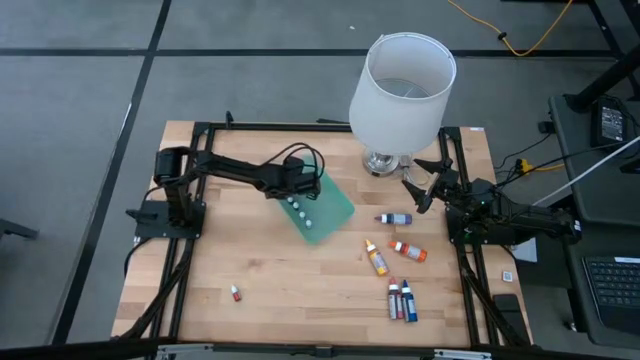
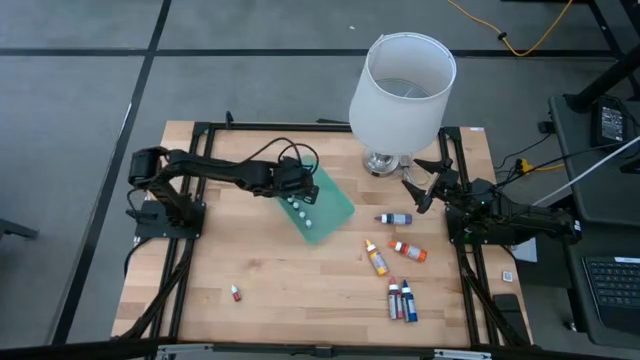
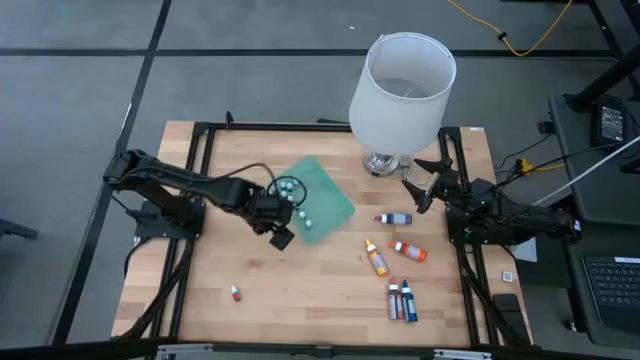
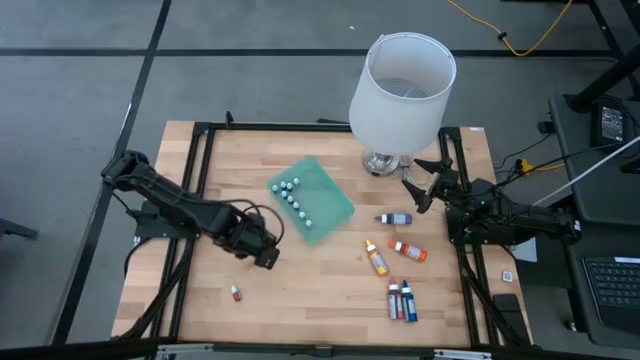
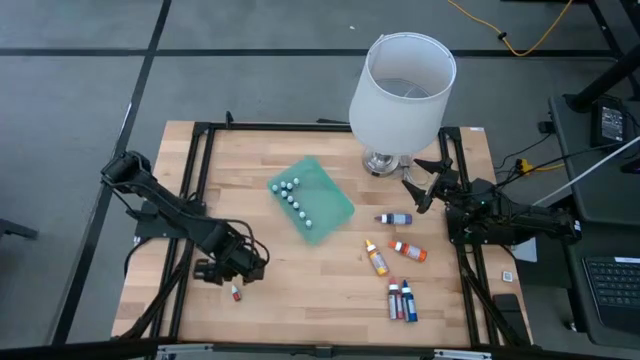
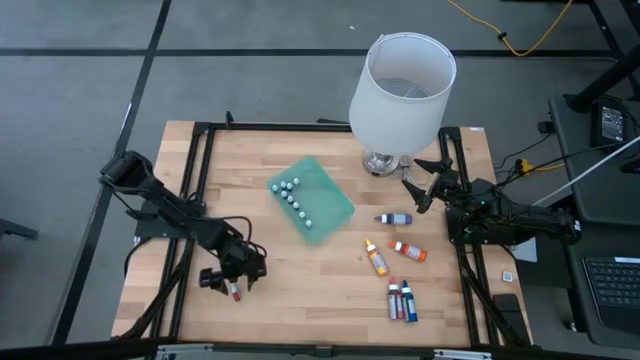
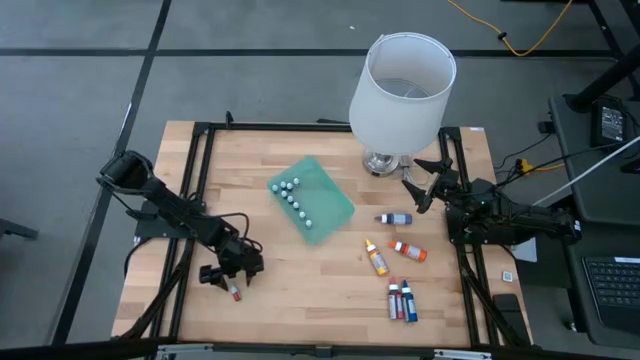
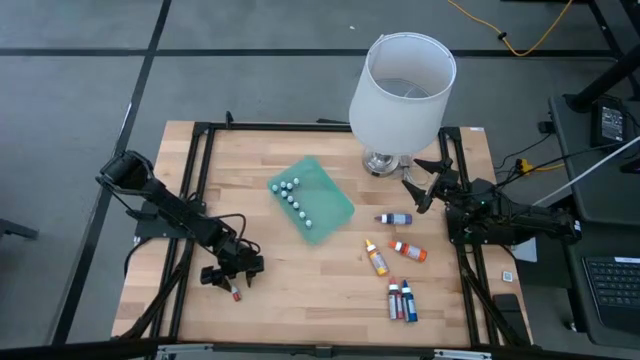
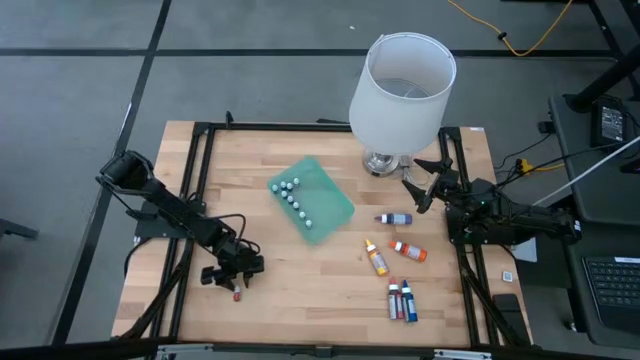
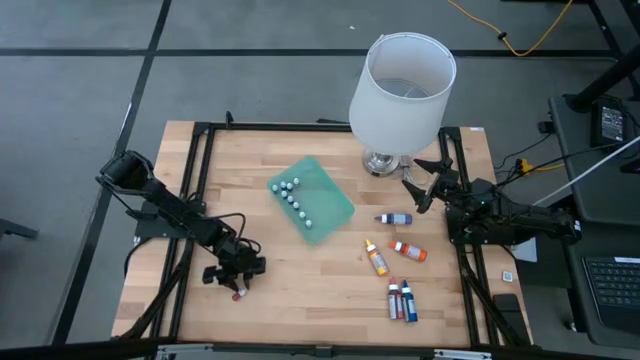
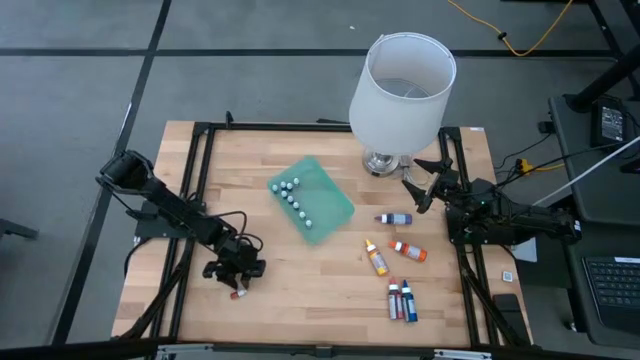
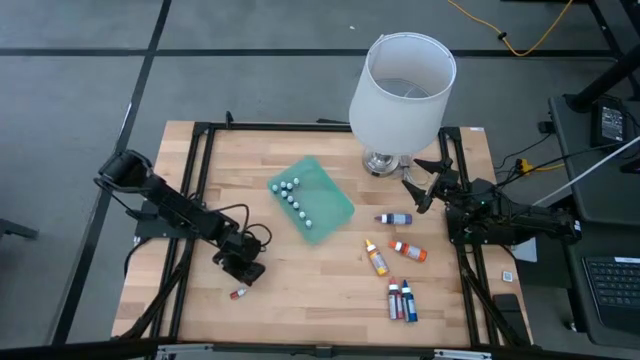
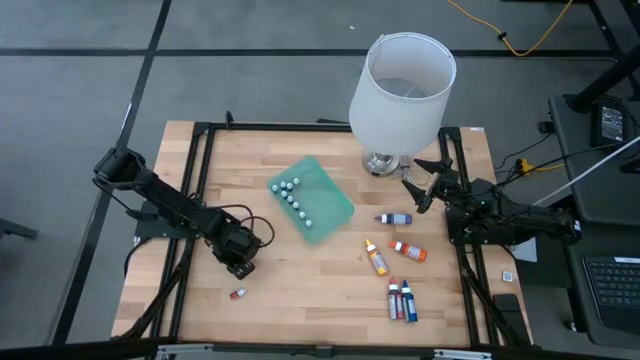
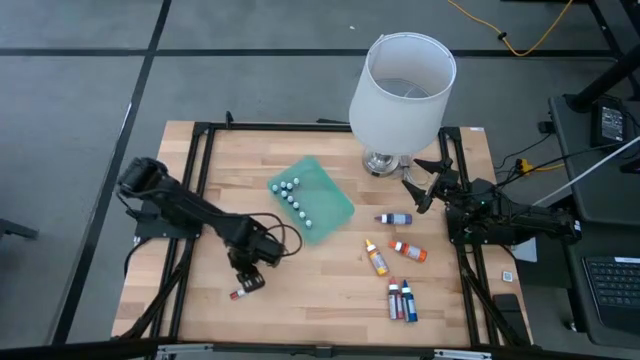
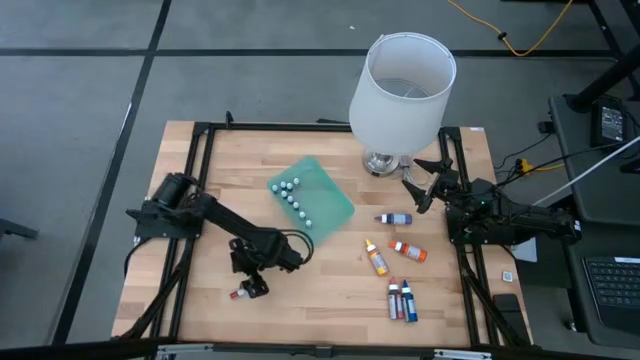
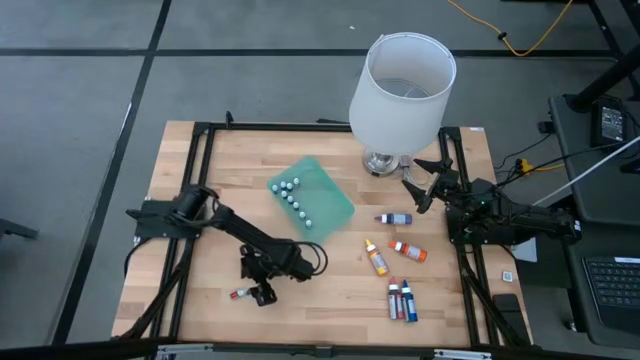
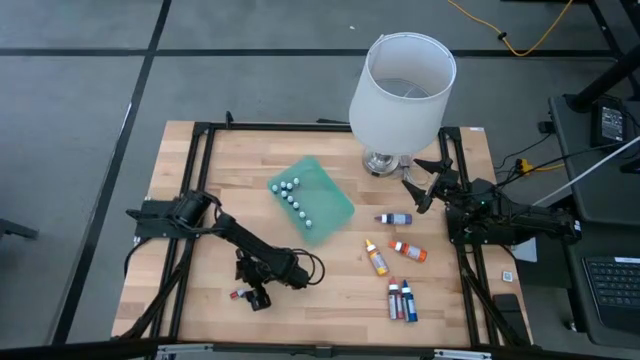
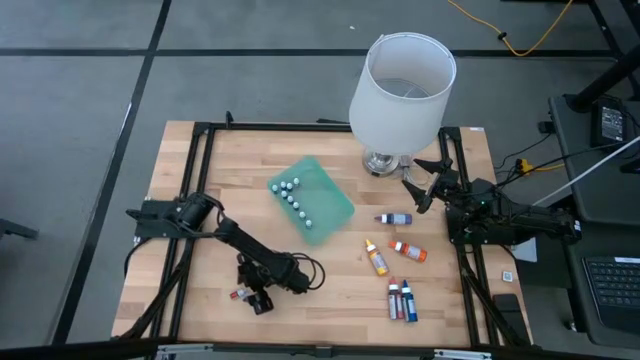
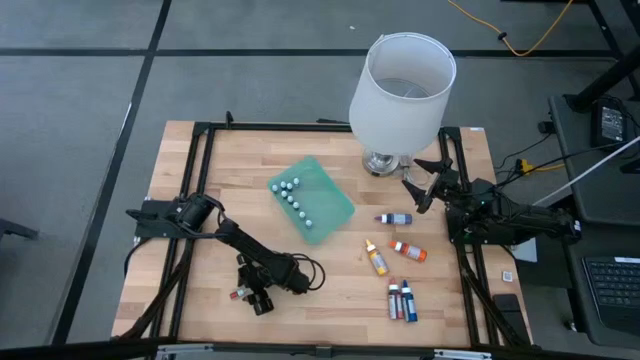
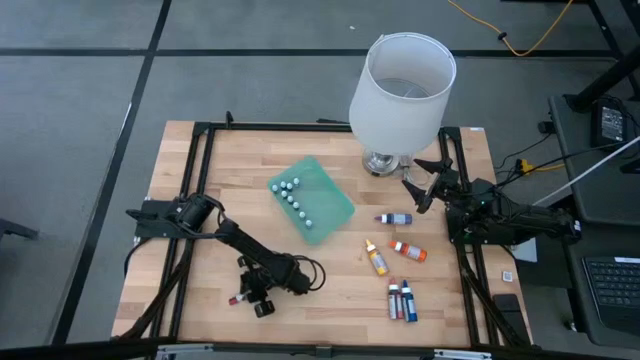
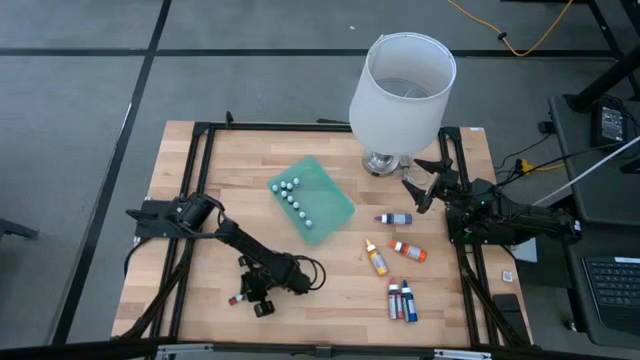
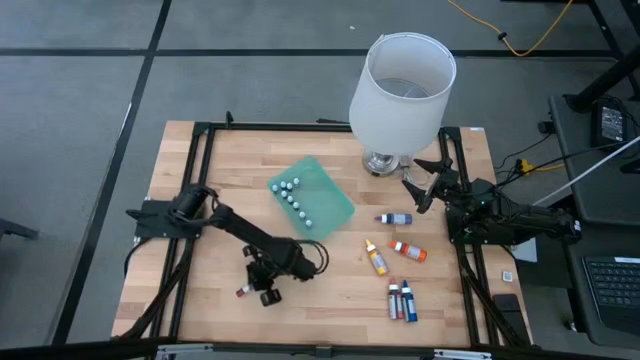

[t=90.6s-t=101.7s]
Task: Pick & Place food coloring
Put the small red food coloring bottle into the green bin

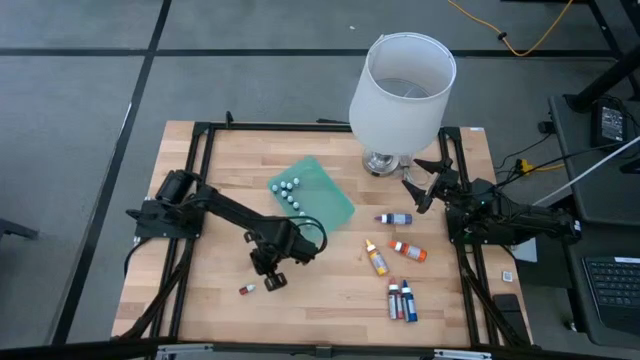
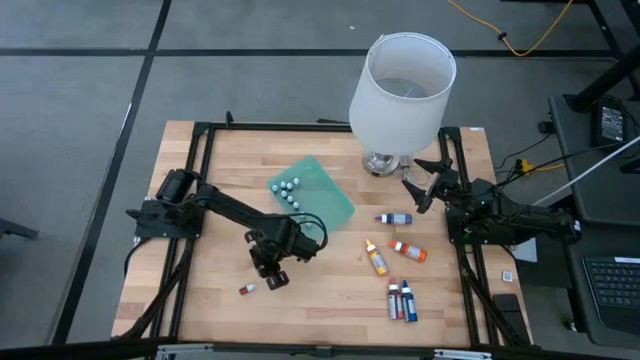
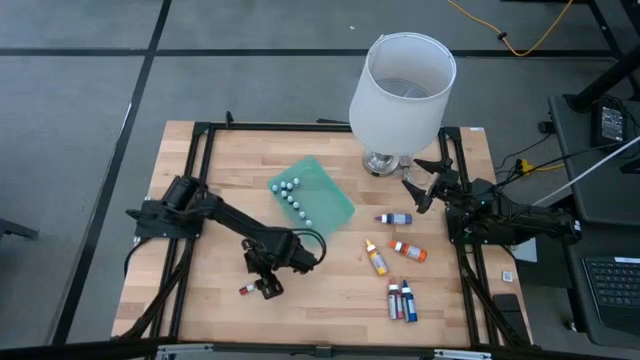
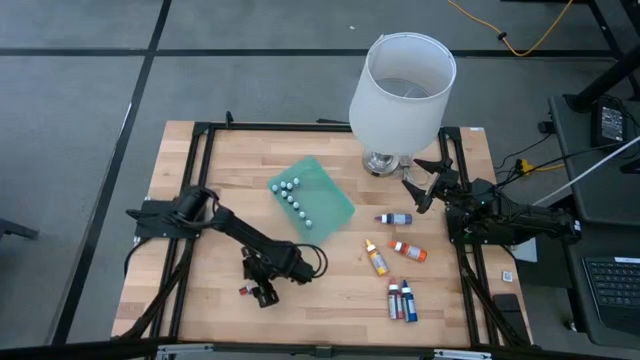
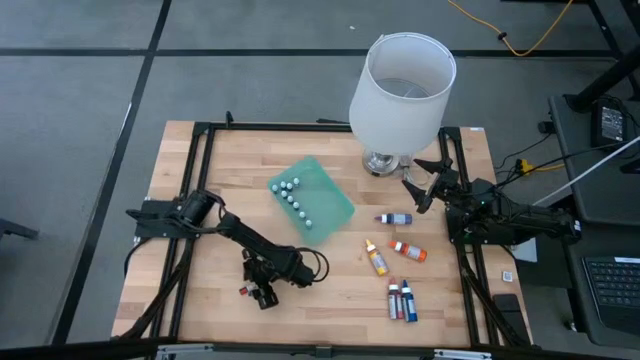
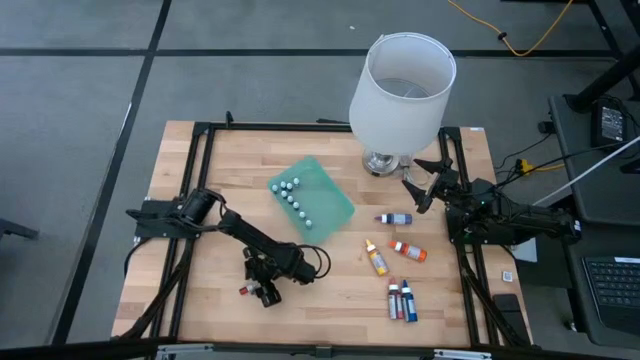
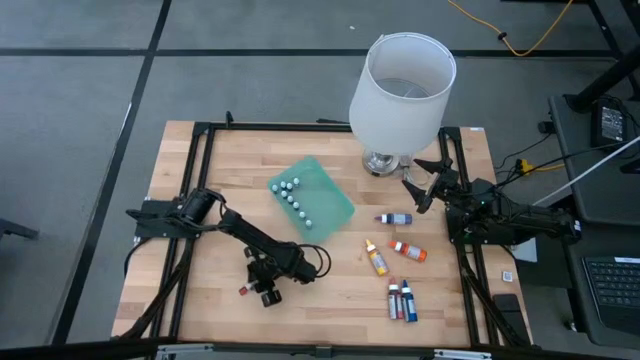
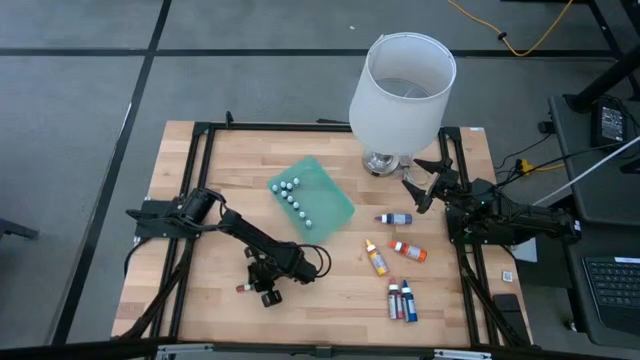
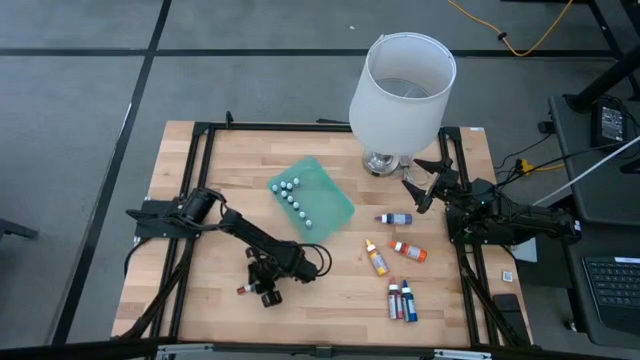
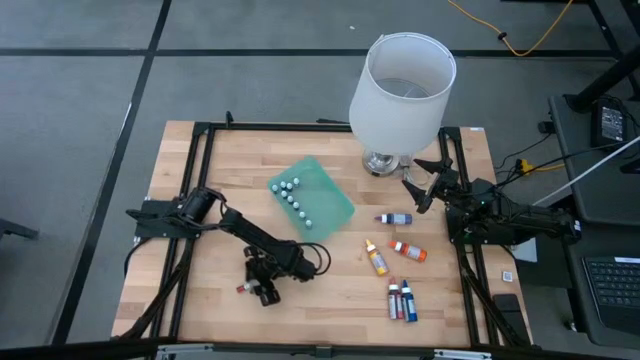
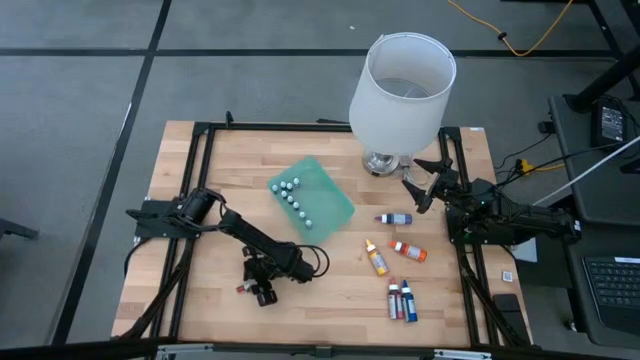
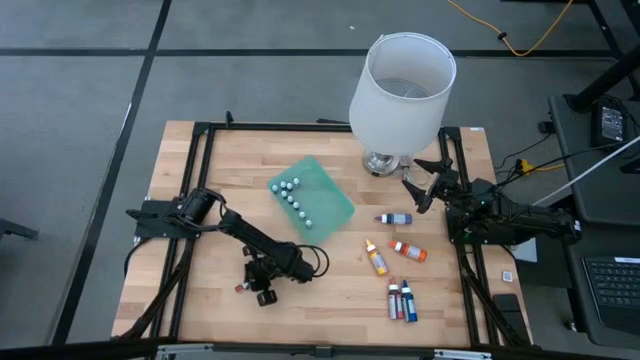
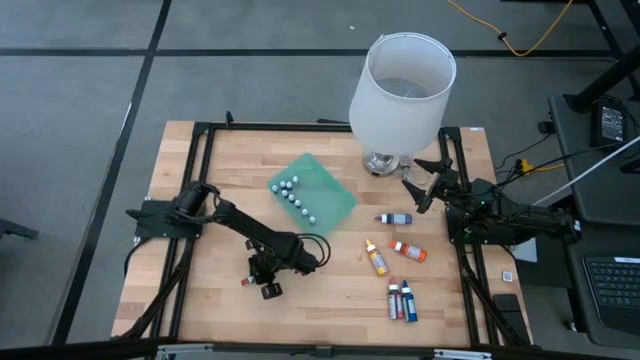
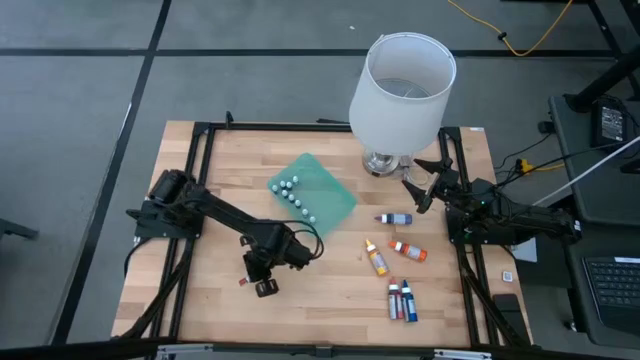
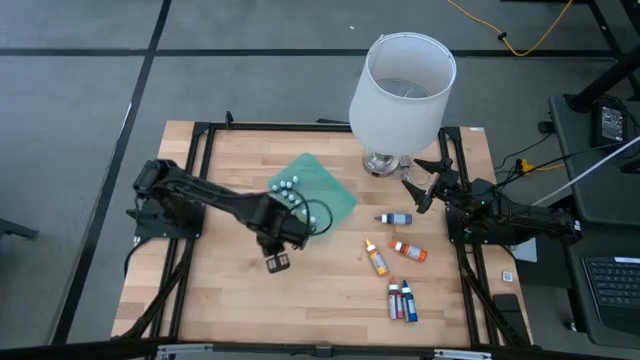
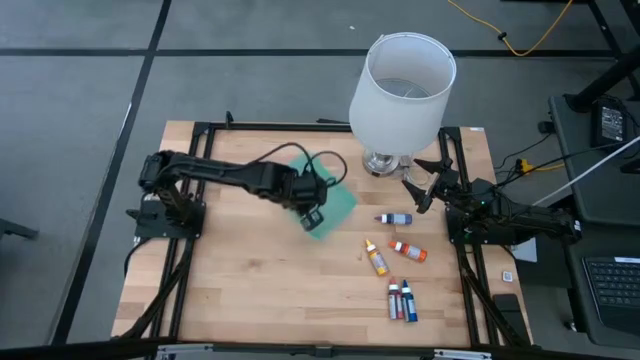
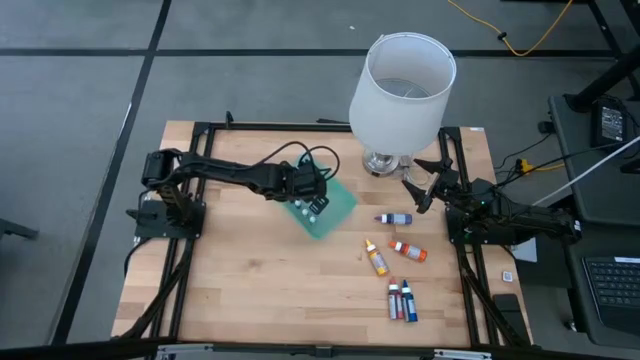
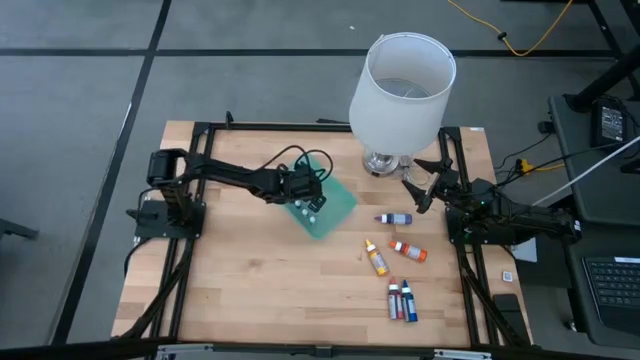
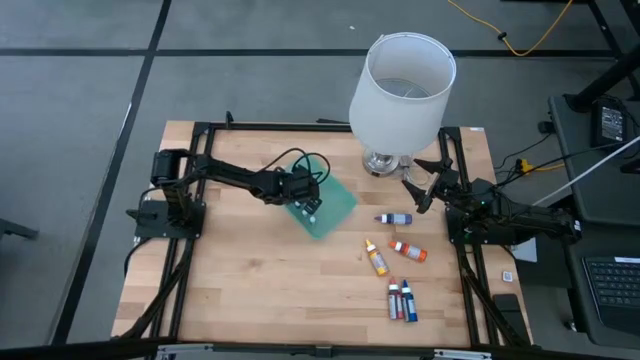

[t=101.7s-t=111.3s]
Put the small red food coloring bottle into the green bin

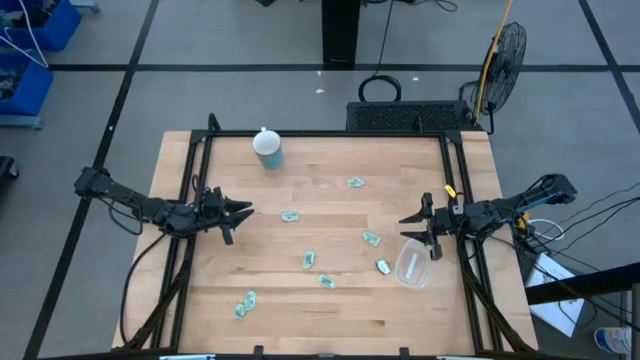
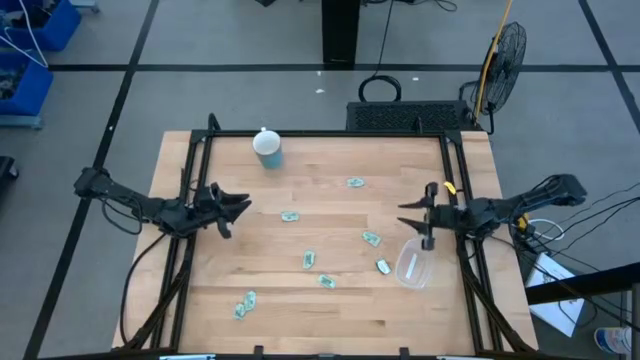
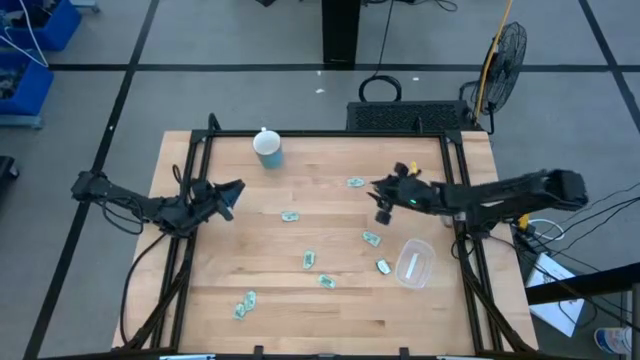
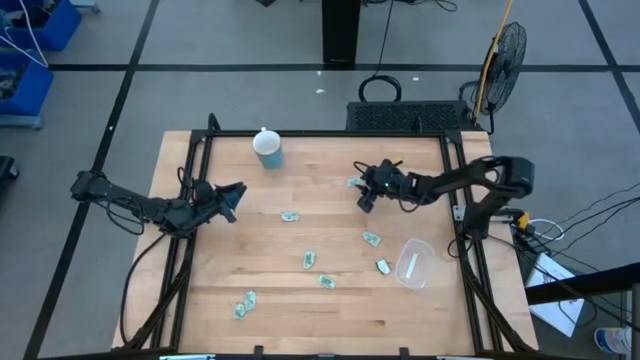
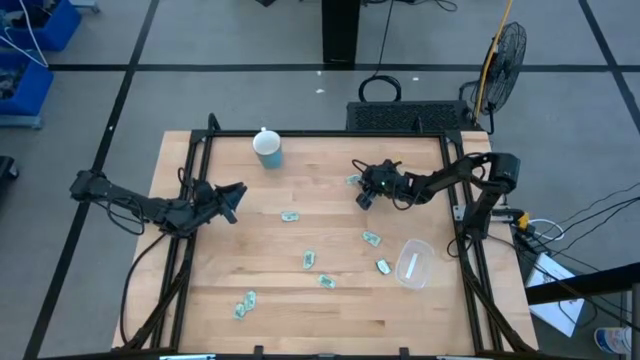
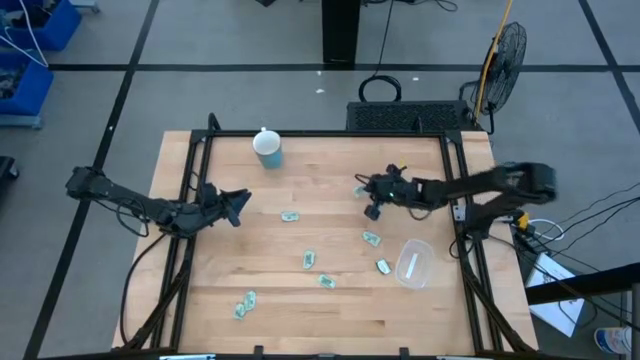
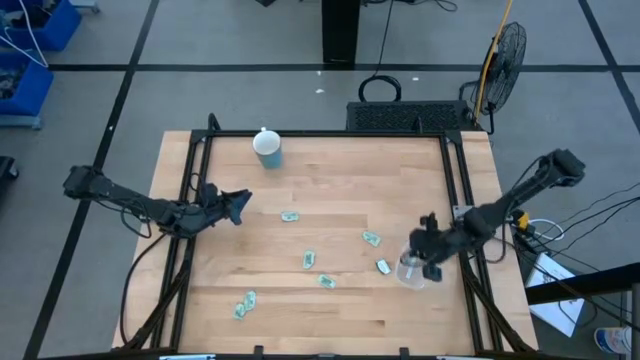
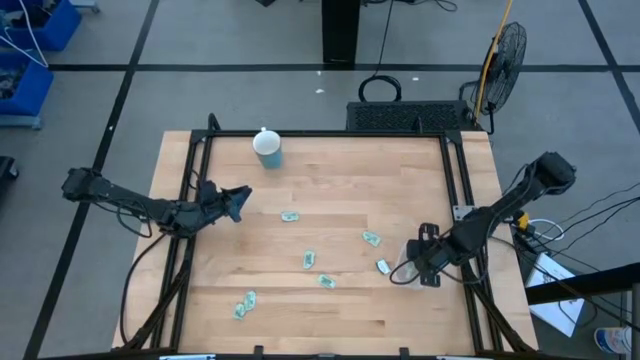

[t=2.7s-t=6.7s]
Task: Pick and place Stevia / Truvia into bins
Put the stevia packet into the transparent container
